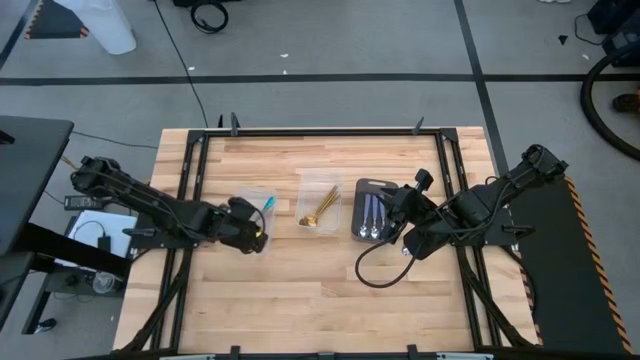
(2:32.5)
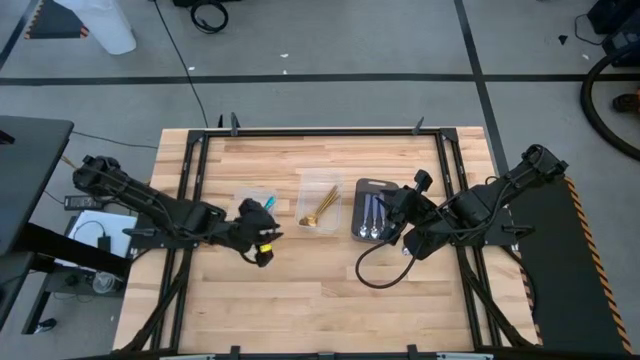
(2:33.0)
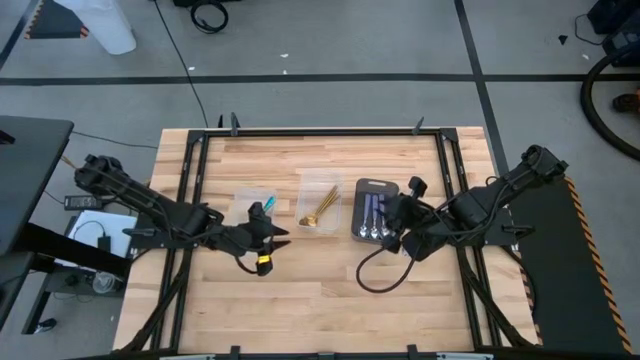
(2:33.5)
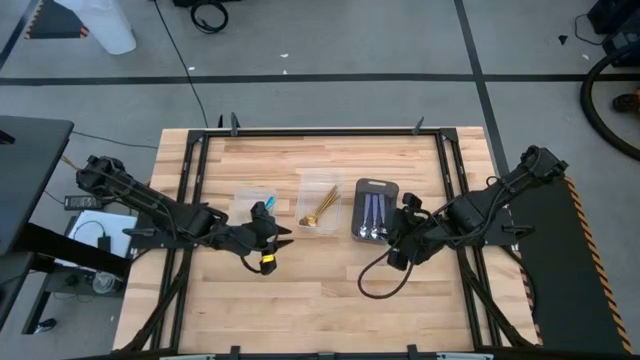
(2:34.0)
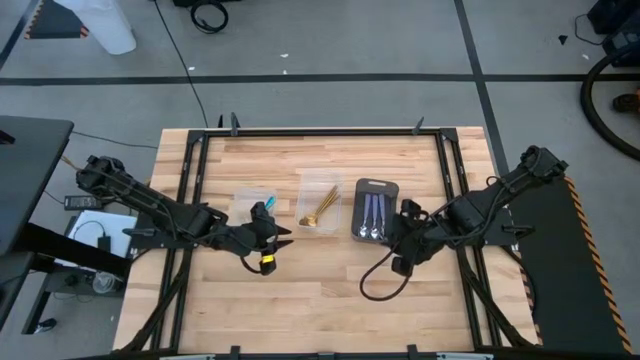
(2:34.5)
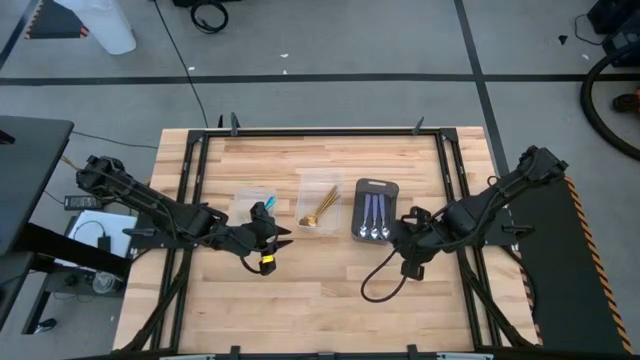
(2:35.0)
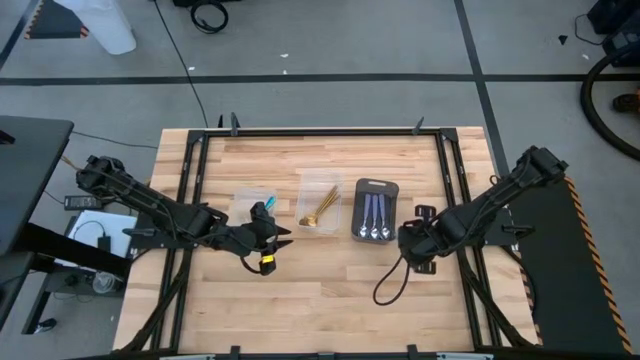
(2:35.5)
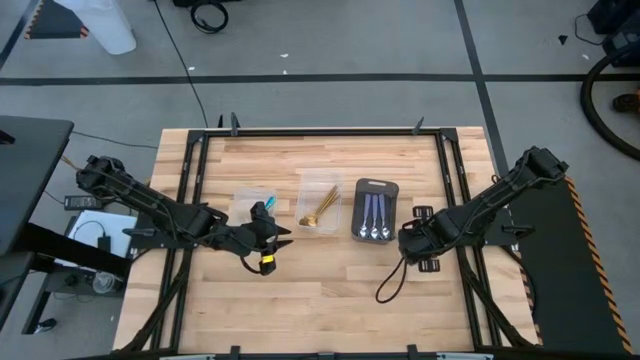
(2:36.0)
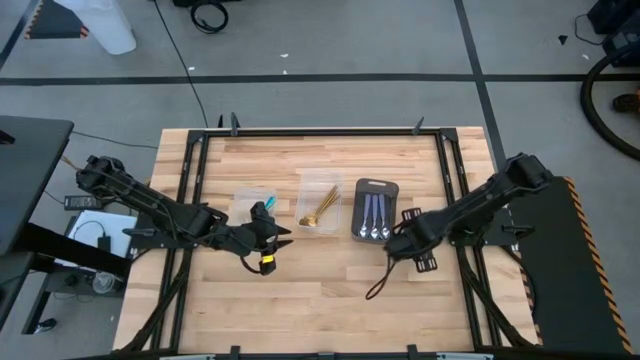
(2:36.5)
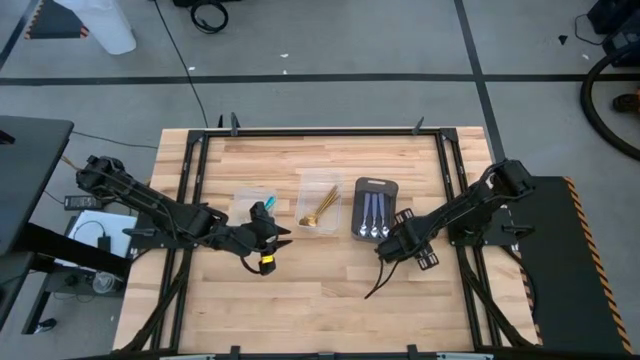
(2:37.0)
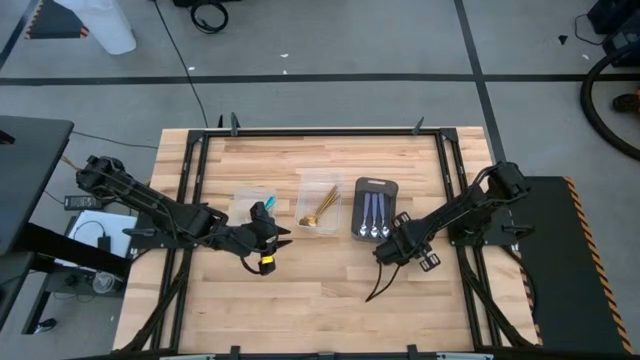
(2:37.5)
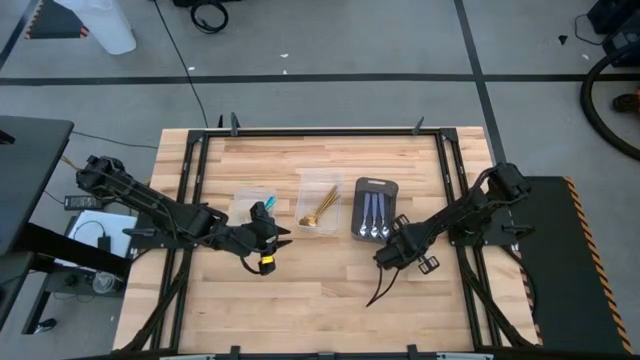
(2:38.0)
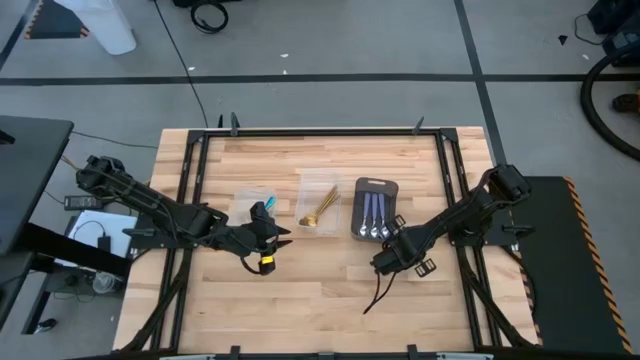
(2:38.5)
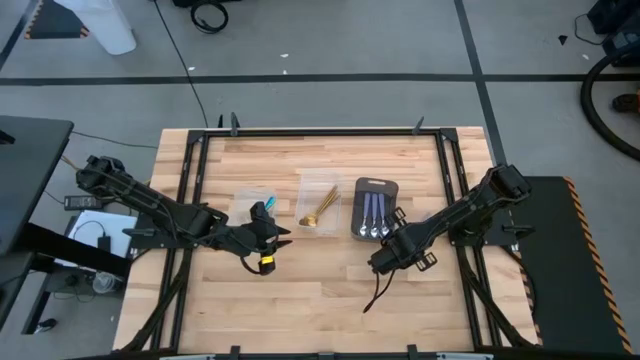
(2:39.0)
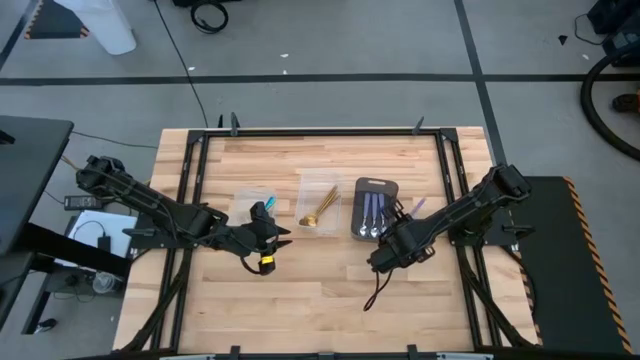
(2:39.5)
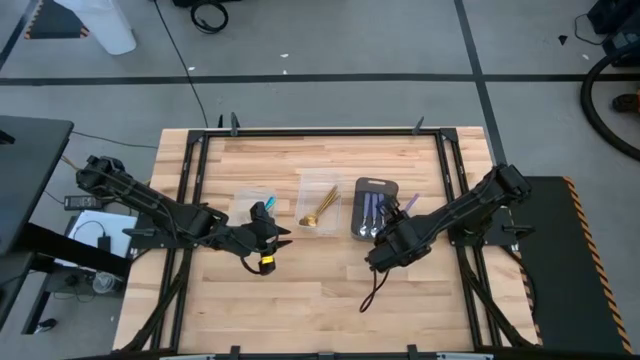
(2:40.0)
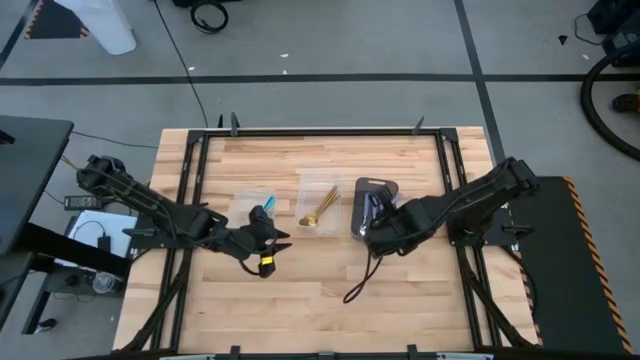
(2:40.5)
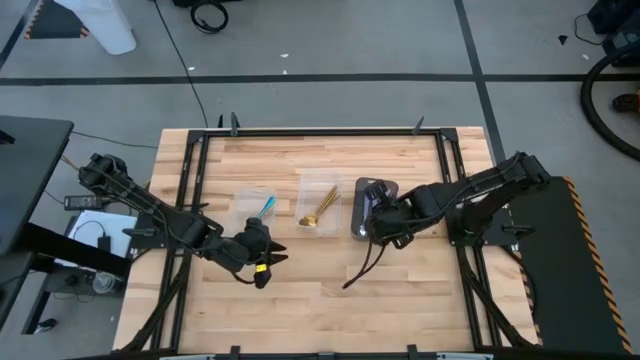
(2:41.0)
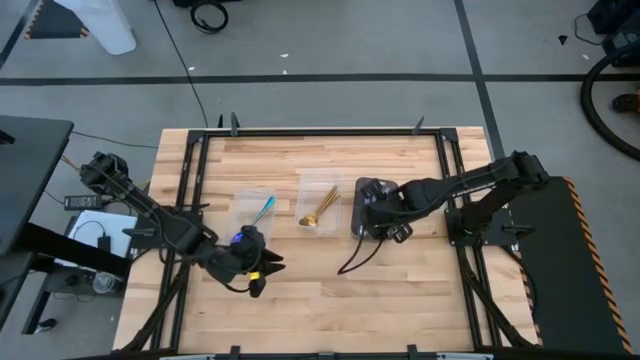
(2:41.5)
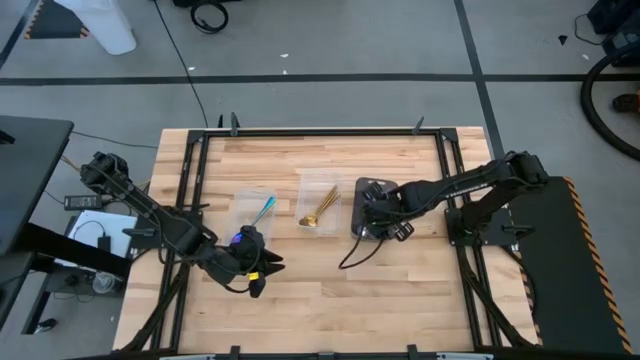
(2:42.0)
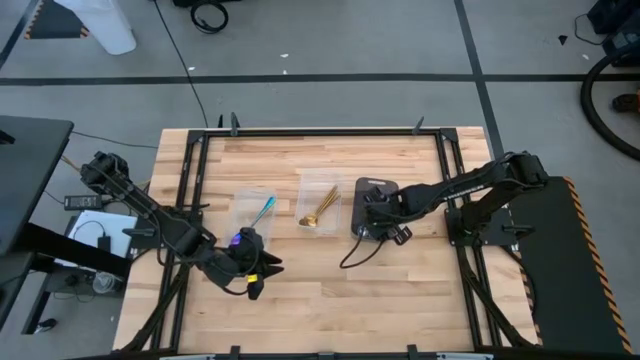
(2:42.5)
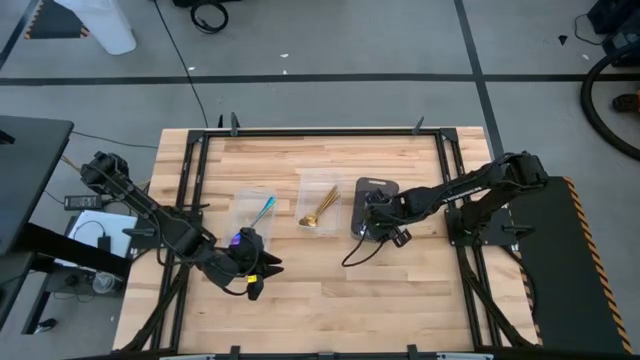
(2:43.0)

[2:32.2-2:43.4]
Task: Sort silverware by color (type)
Put the purple spoon into the black bin

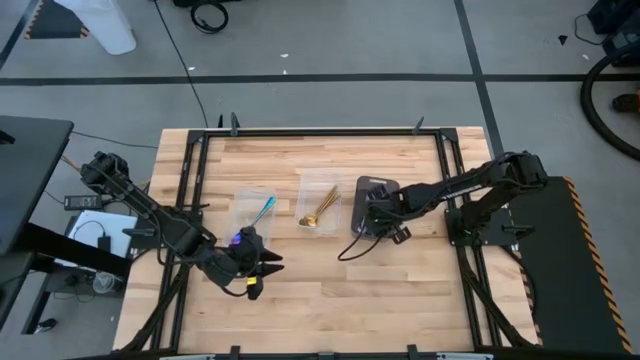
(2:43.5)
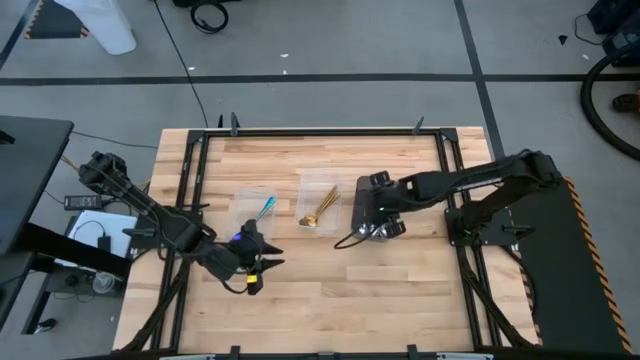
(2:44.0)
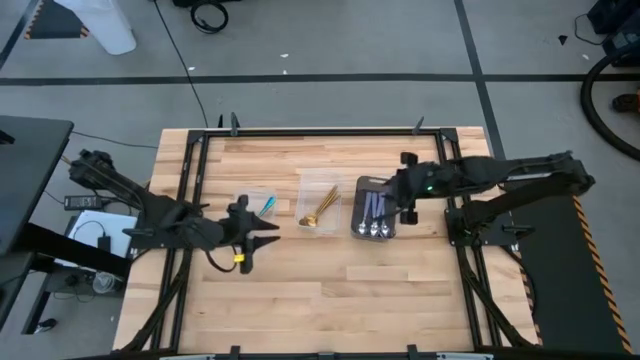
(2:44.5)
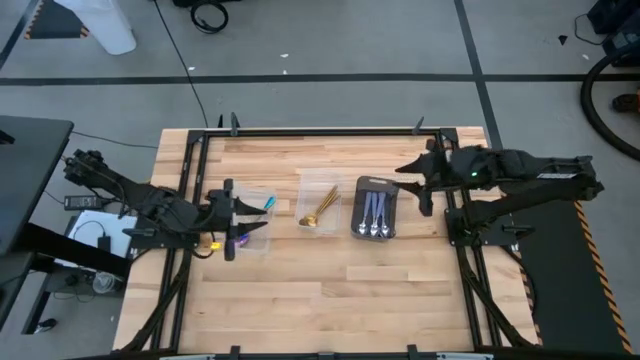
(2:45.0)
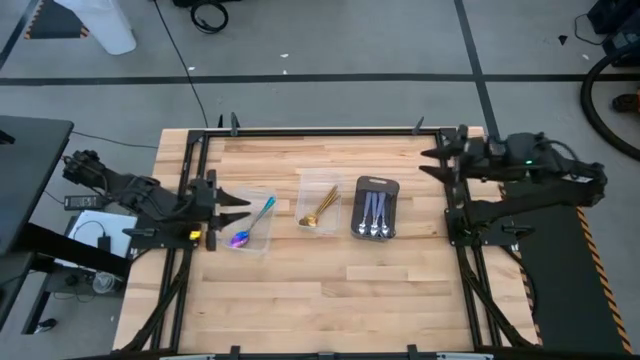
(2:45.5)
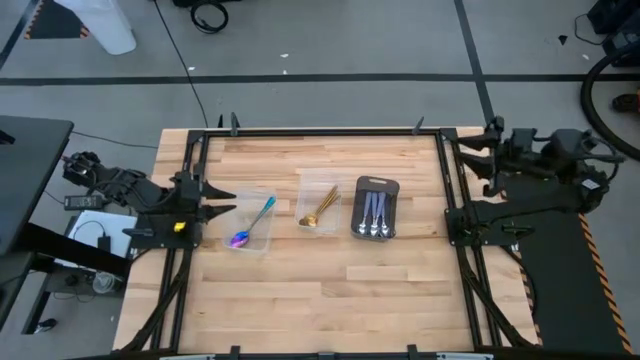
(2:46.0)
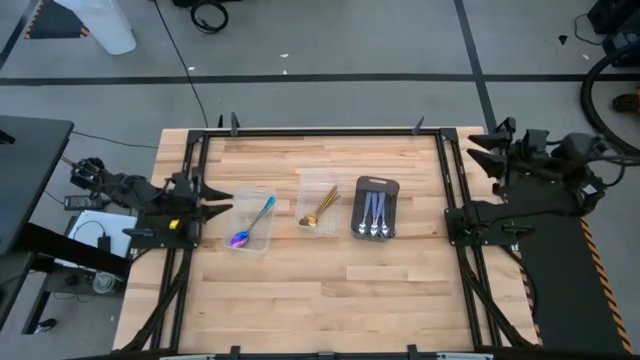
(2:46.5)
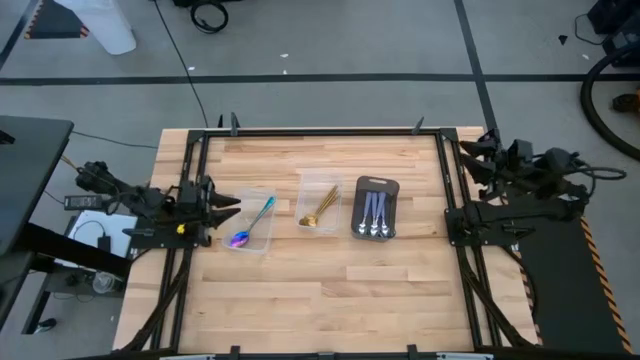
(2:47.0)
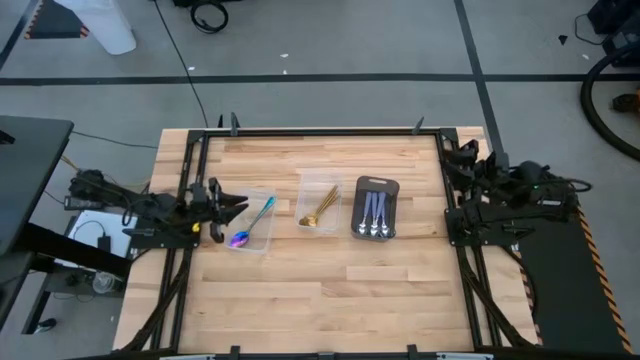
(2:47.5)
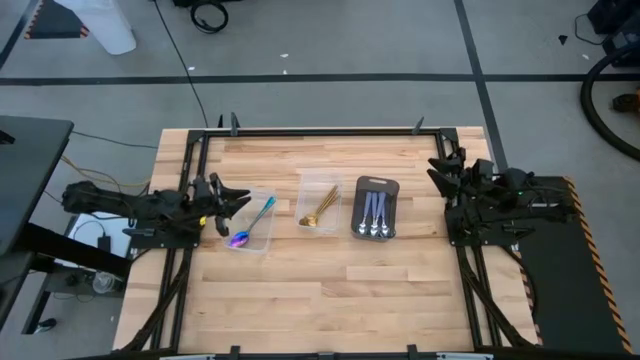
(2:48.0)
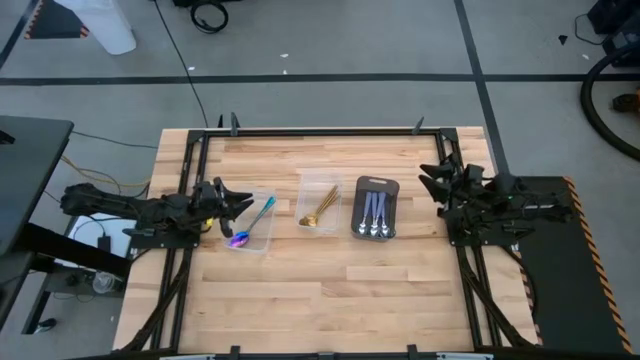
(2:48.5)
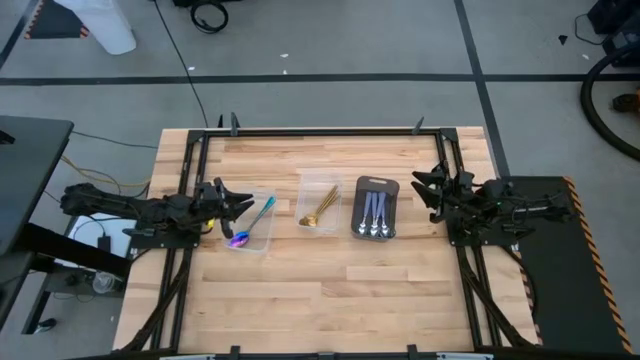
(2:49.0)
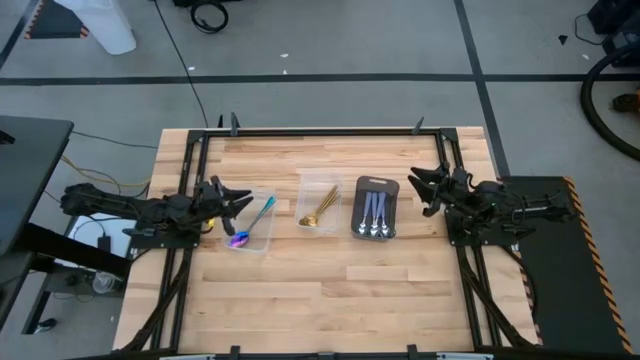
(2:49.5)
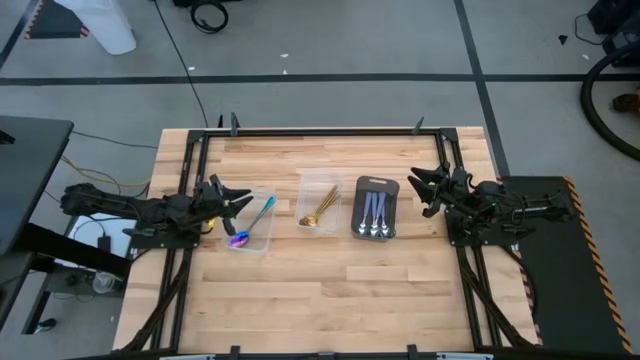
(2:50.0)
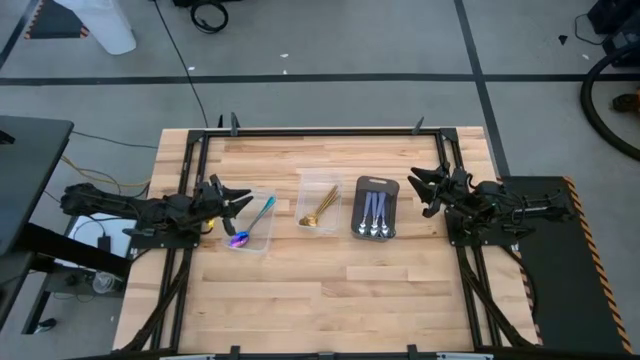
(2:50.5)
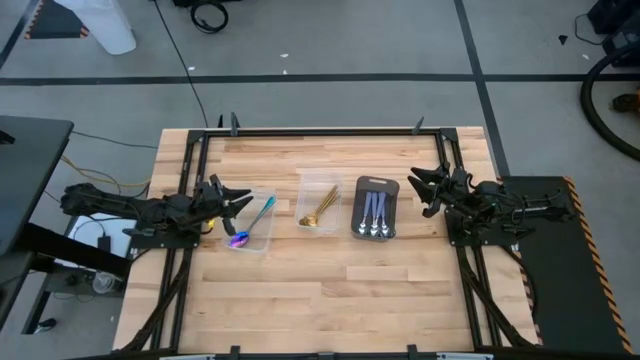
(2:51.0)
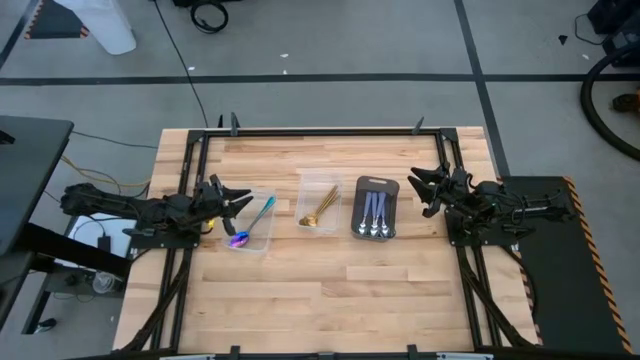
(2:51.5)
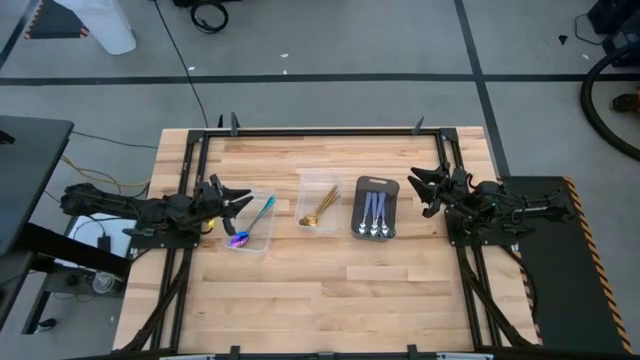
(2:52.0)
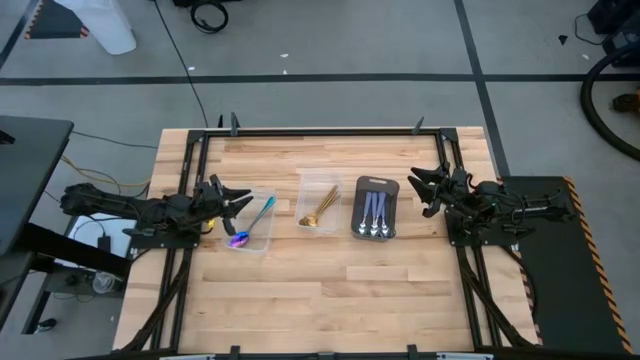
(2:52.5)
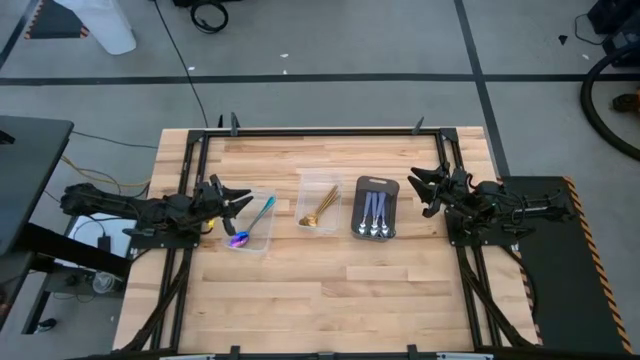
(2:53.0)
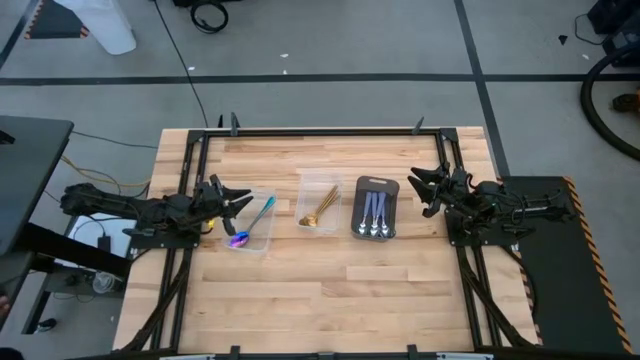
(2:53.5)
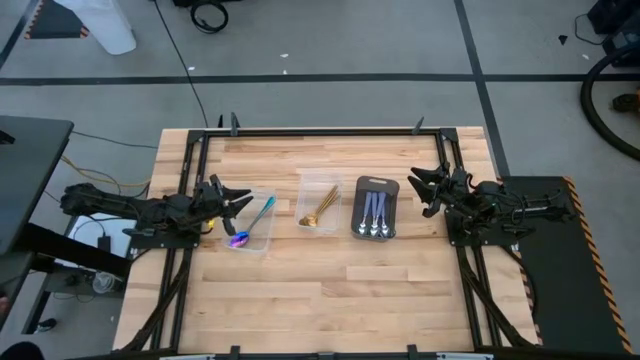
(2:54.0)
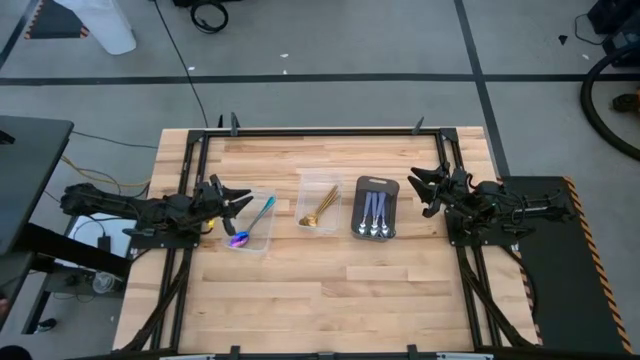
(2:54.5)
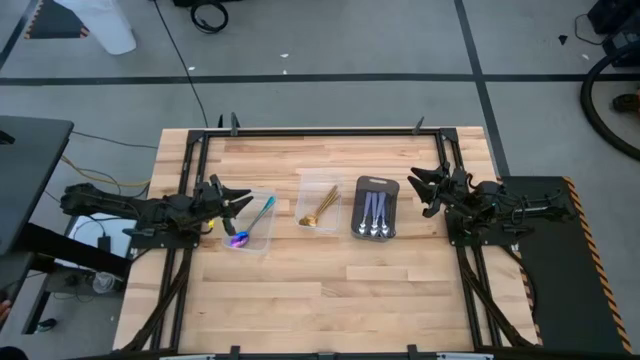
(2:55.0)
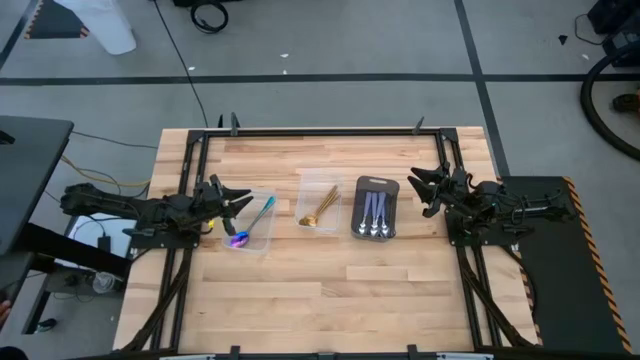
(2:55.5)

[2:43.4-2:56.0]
Return to Home Position
